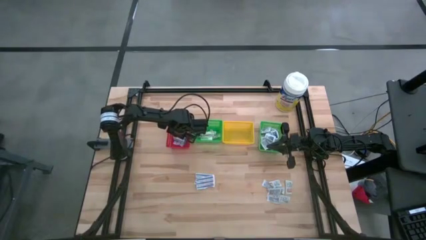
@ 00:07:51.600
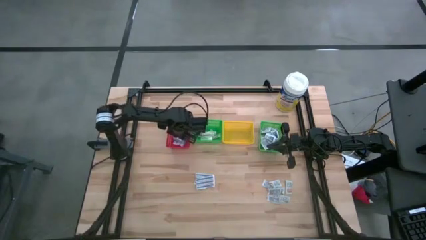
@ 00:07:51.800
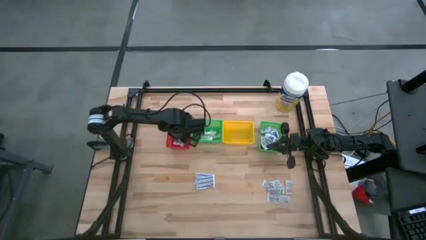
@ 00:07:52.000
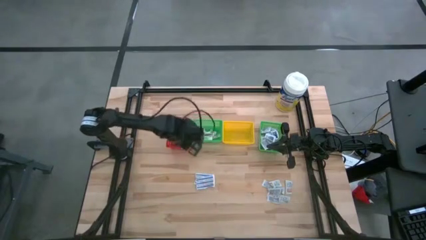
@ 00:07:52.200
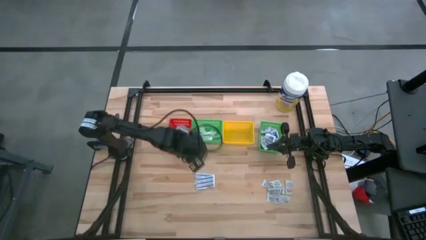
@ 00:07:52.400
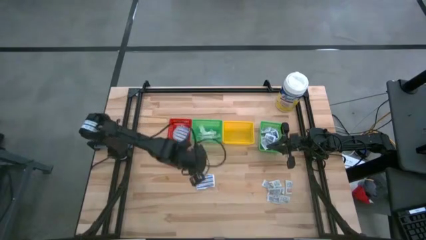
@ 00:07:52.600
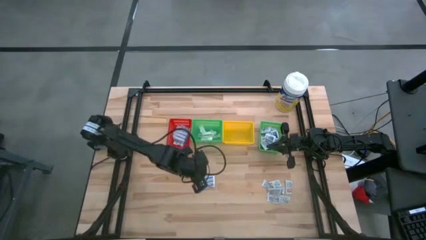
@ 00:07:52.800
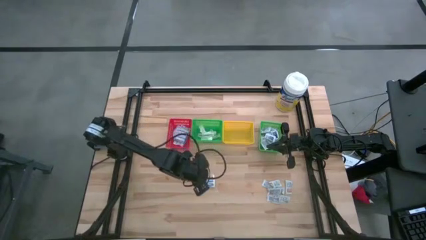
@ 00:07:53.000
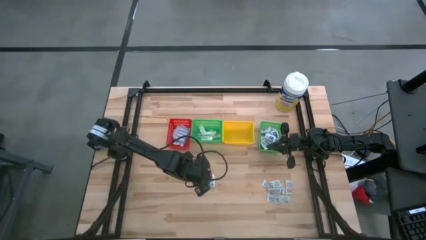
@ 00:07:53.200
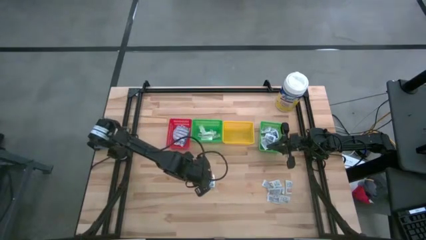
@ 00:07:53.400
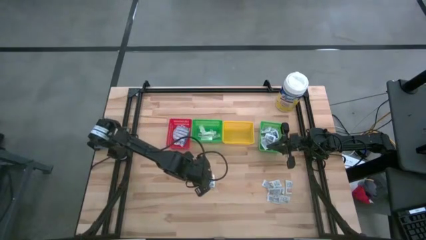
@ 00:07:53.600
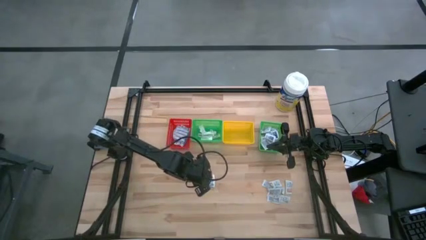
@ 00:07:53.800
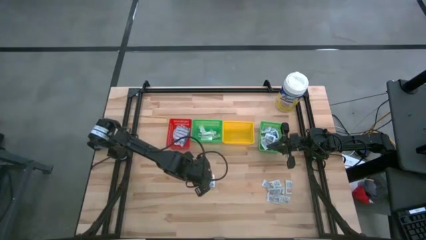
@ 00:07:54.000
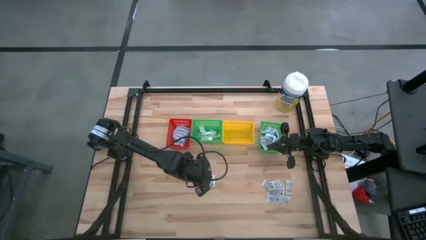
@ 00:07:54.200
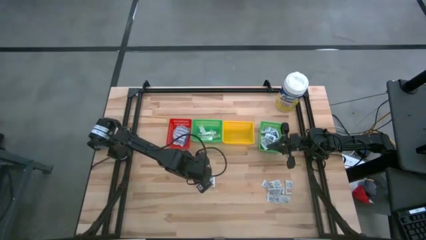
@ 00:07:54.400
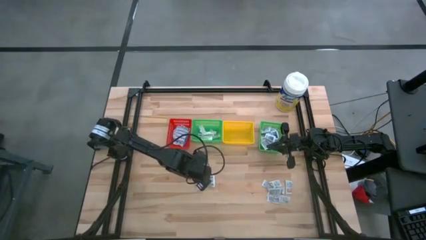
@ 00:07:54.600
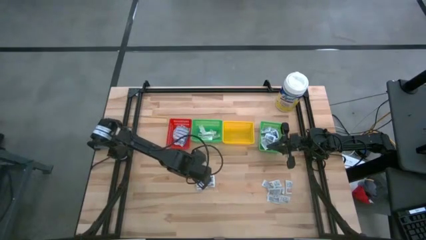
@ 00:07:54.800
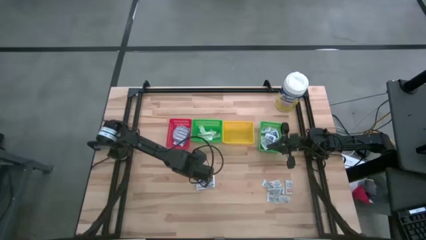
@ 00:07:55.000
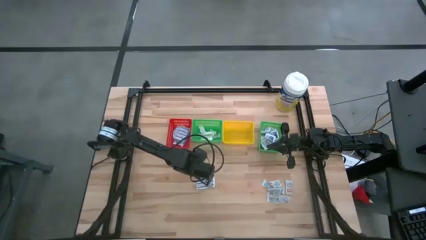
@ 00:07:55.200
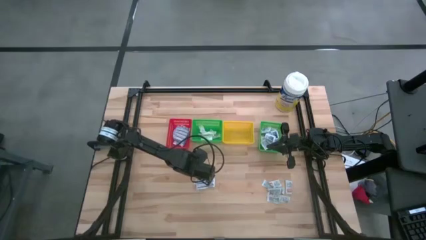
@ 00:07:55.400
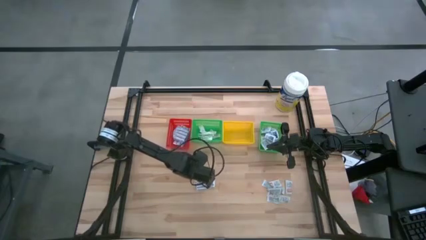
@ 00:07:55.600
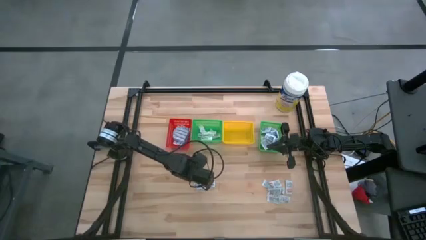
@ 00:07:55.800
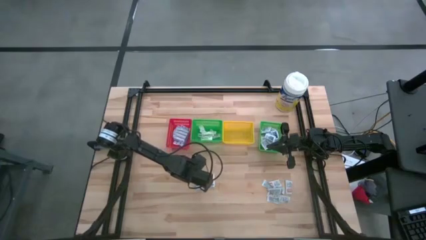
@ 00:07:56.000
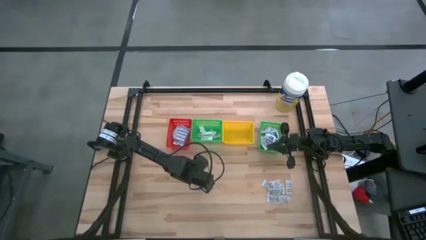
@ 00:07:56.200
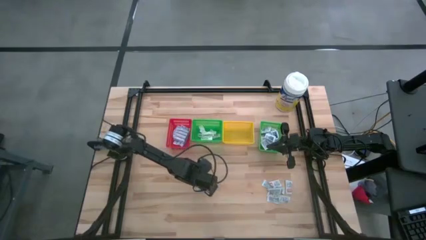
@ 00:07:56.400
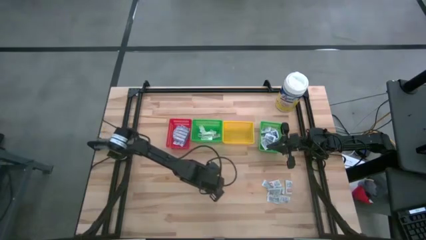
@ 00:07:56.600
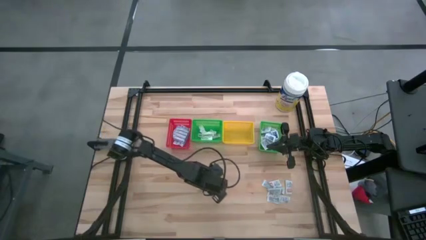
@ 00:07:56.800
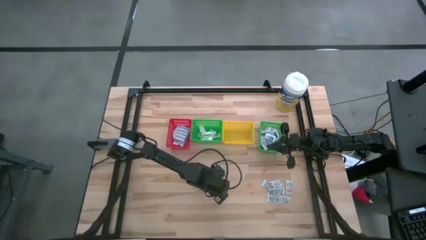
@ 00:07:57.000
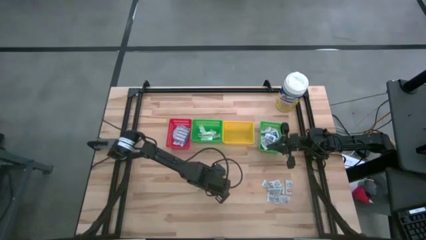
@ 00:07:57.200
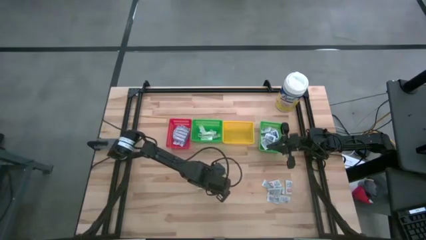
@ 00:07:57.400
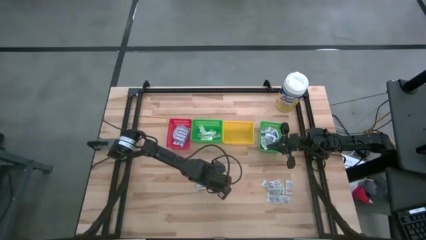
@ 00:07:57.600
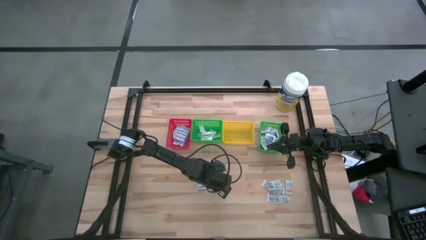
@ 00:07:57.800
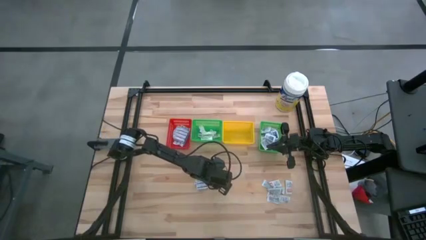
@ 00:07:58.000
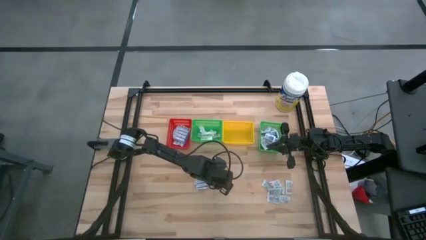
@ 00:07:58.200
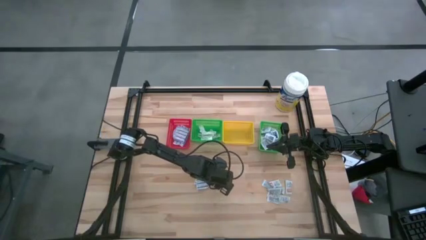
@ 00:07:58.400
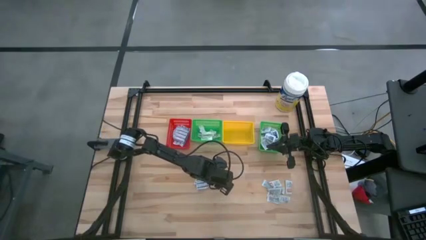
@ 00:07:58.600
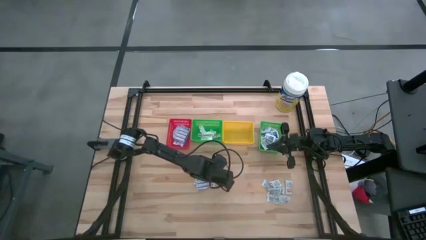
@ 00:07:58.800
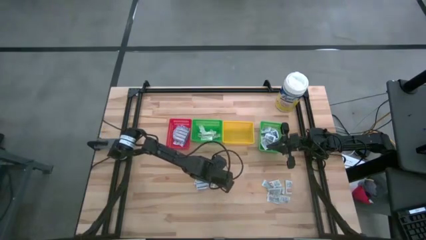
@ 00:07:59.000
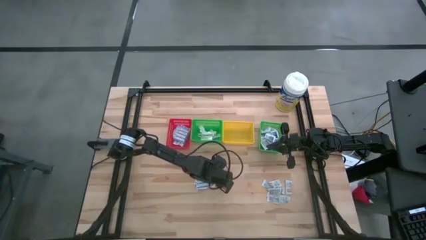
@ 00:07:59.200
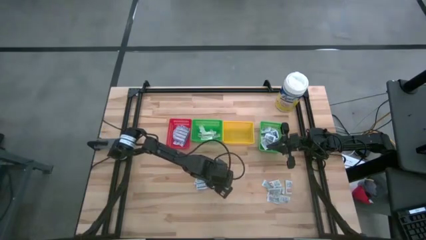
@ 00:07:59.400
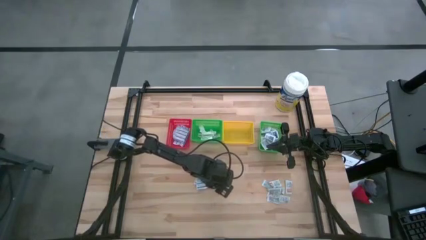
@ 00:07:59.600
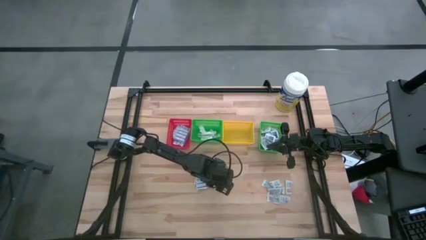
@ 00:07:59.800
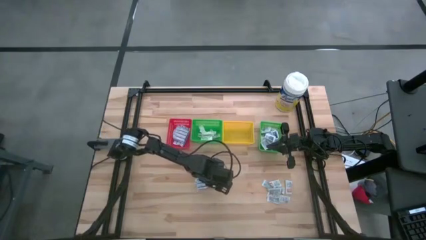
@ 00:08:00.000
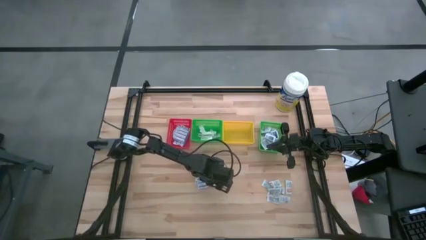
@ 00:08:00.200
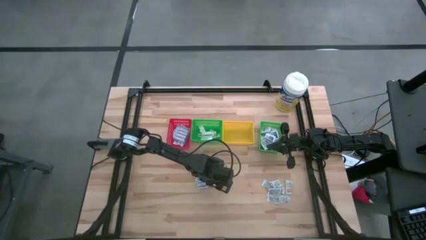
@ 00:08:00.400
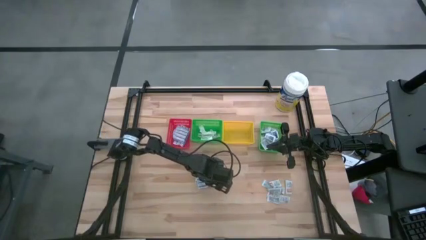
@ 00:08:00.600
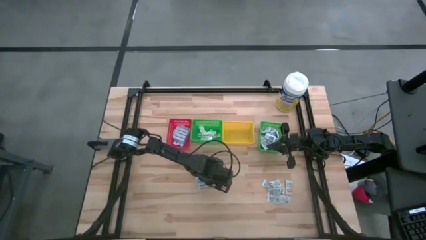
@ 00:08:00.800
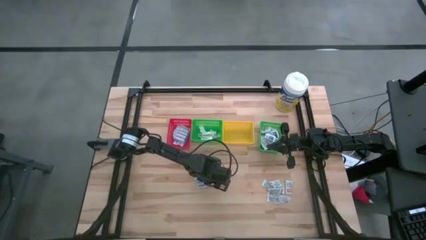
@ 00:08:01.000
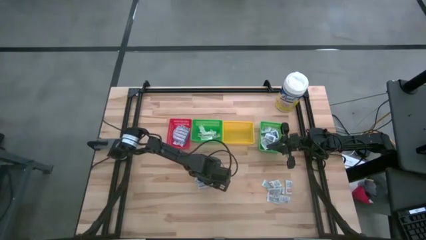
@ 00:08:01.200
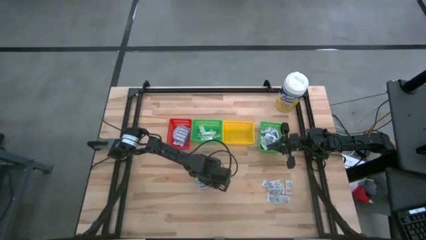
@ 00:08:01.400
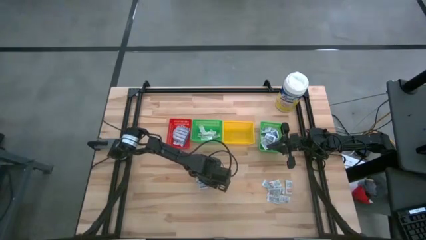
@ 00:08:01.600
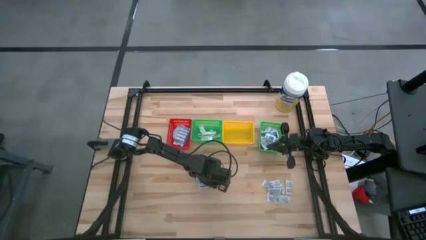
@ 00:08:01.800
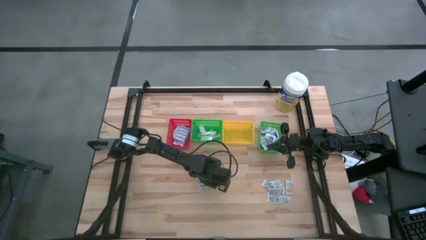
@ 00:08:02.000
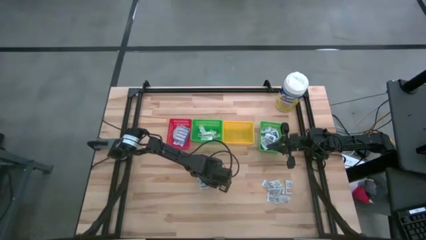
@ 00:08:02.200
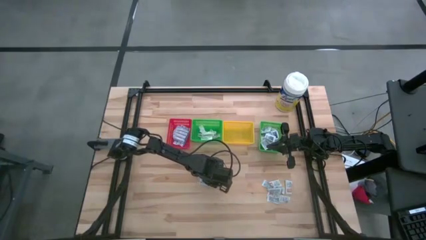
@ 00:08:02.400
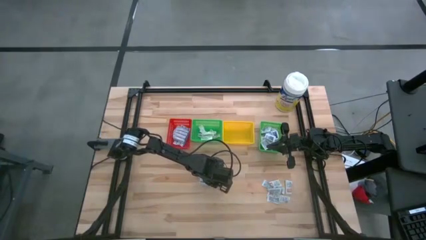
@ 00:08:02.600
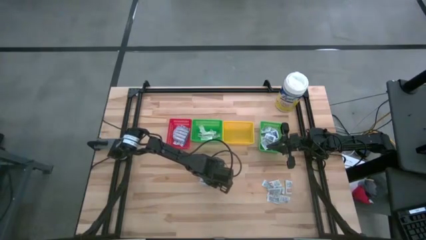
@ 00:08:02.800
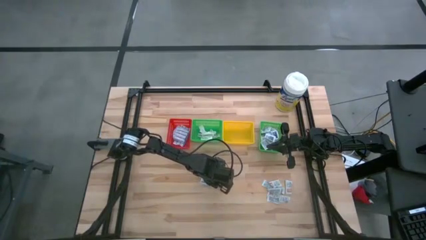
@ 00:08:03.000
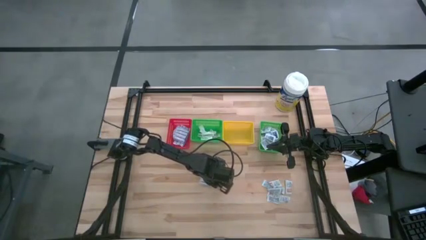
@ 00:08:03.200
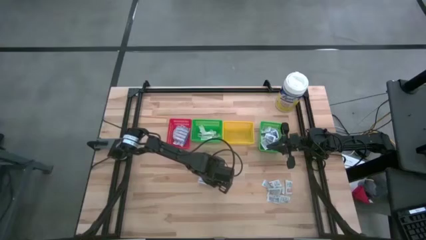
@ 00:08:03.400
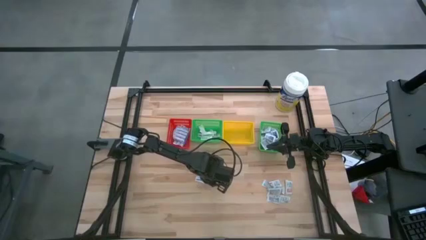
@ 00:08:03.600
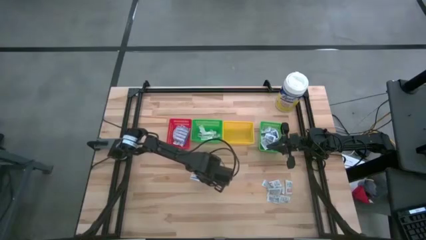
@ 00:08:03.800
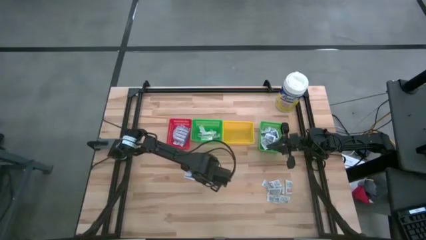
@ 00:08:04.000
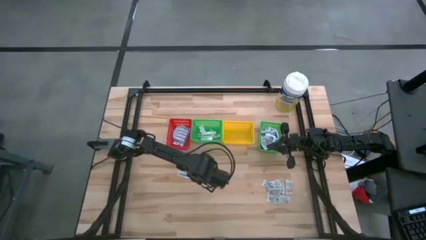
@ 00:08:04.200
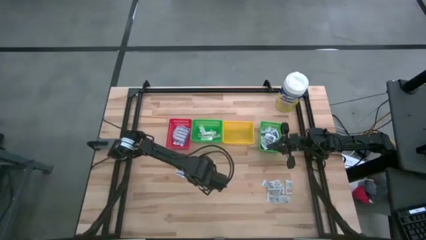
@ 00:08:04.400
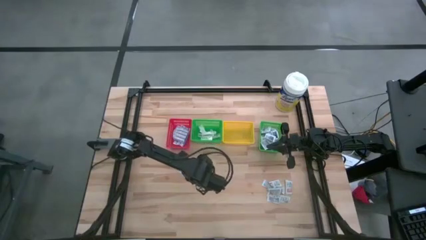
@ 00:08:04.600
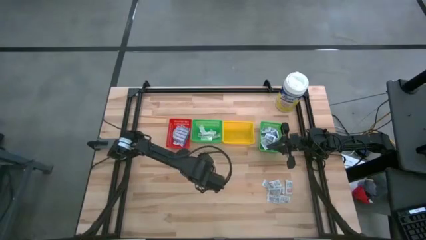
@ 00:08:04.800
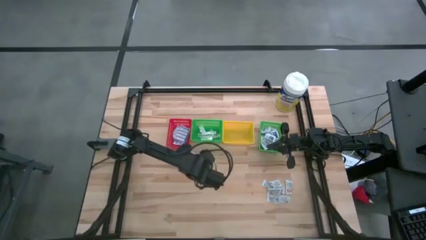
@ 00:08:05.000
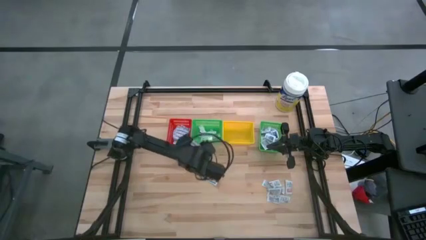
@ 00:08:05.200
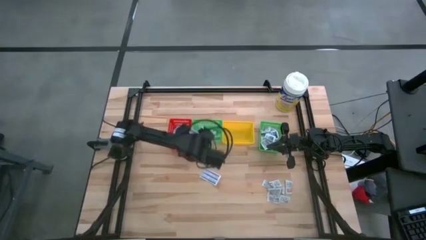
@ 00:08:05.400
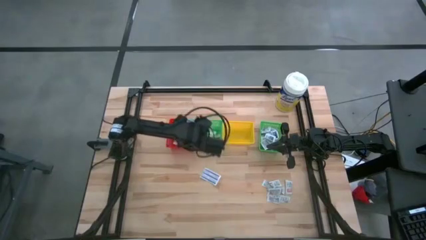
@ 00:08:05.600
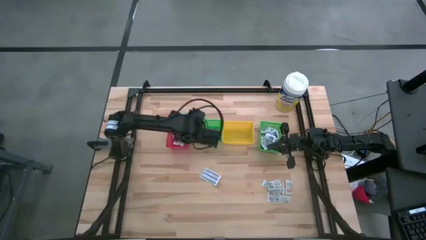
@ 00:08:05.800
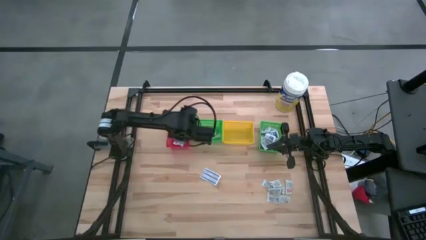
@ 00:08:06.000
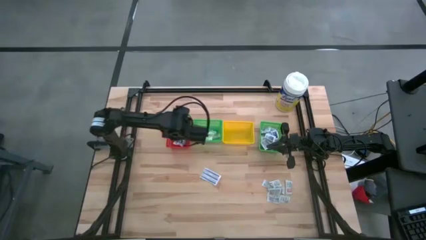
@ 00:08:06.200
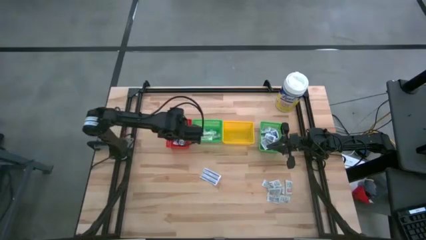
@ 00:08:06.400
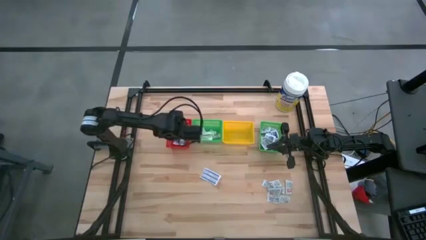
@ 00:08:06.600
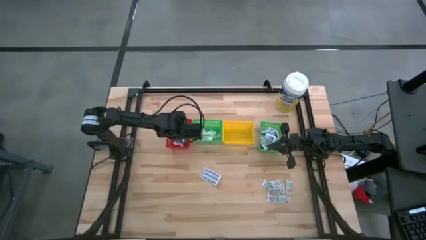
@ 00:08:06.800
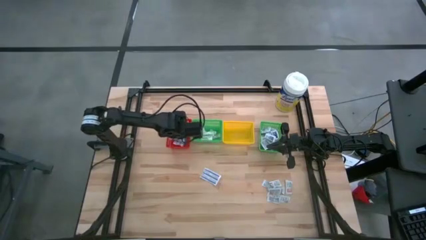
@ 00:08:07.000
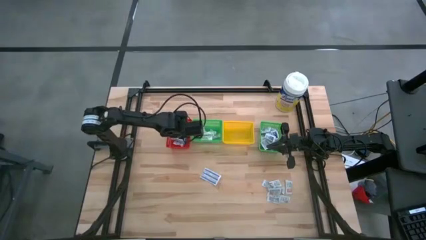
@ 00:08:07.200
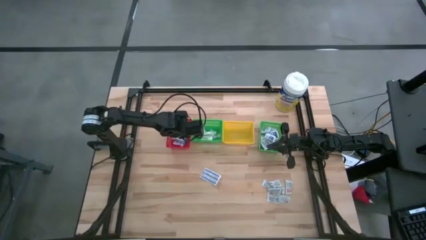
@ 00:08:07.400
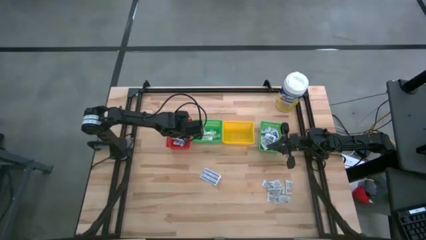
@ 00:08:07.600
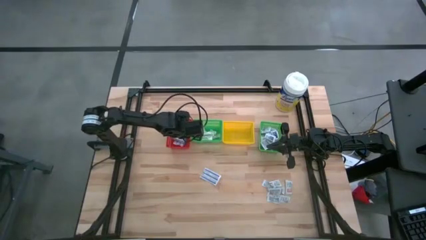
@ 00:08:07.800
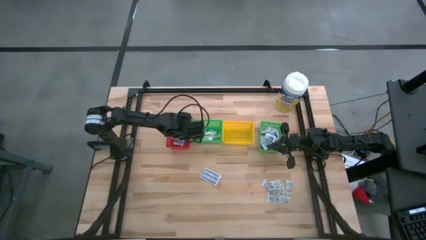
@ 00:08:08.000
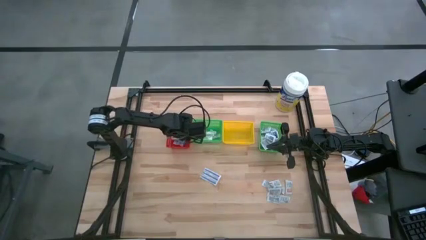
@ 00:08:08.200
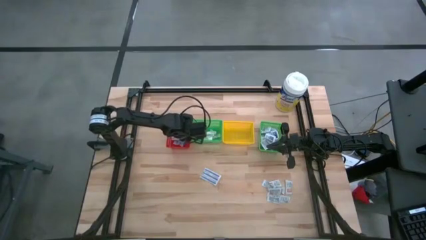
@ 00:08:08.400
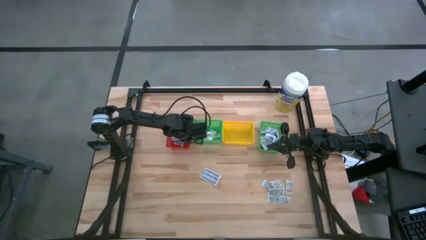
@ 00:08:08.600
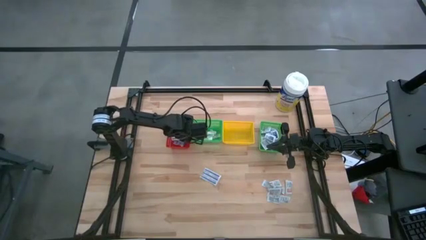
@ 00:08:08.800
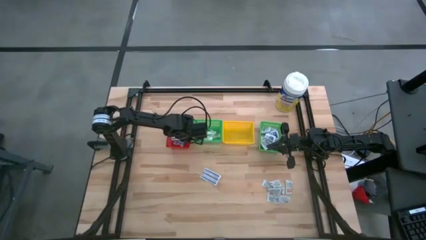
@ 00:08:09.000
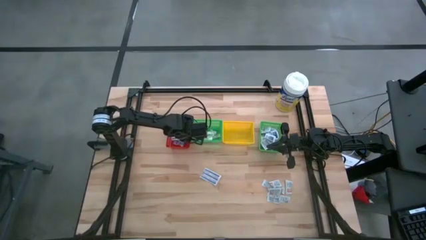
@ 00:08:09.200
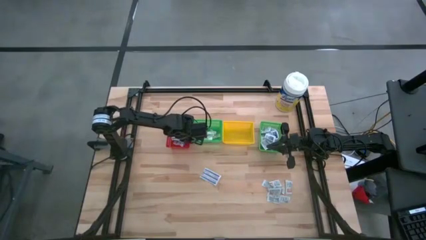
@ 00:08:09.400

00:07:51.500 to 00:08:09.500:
Task: Pick & Place First Aid Supplies
Put the blue bandage into the red bin
